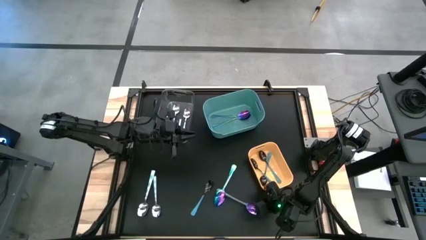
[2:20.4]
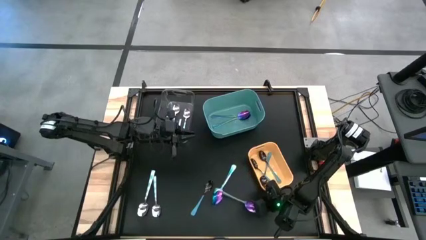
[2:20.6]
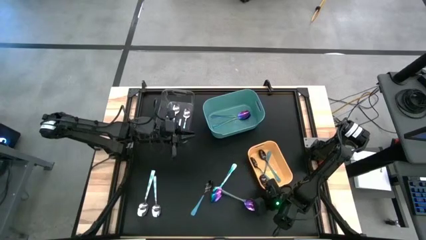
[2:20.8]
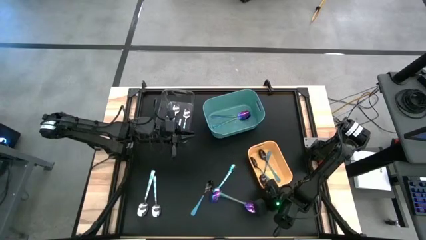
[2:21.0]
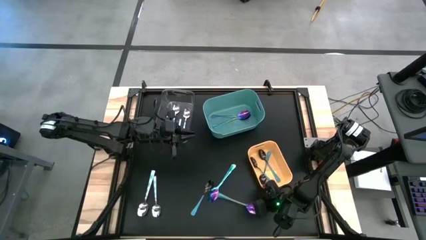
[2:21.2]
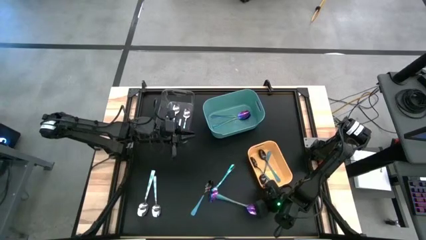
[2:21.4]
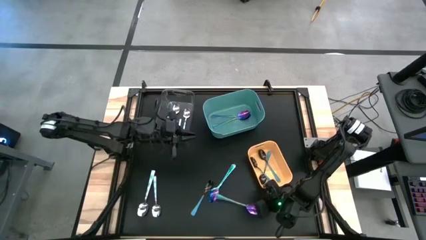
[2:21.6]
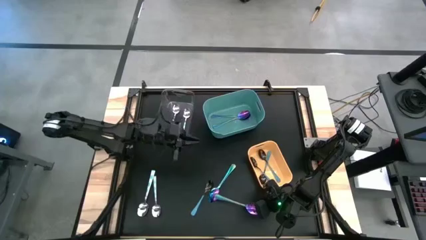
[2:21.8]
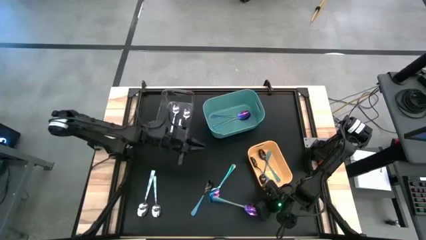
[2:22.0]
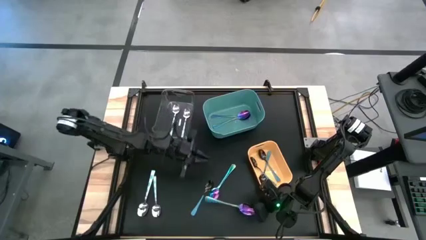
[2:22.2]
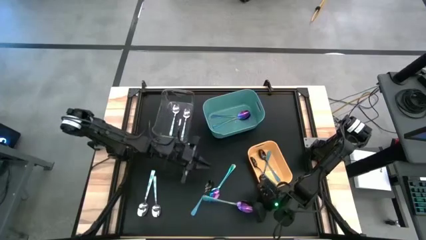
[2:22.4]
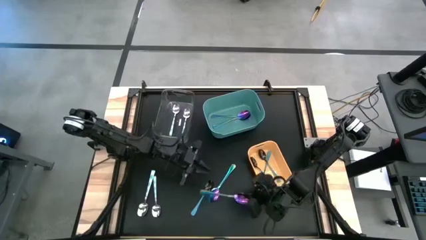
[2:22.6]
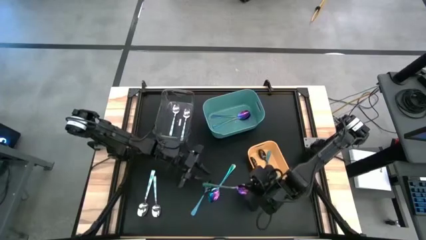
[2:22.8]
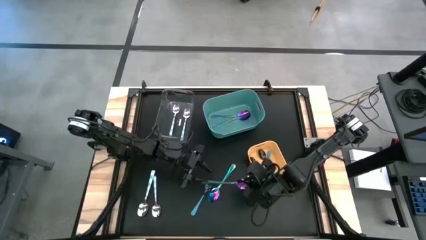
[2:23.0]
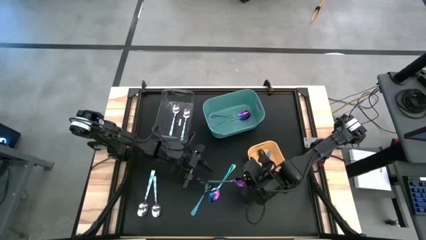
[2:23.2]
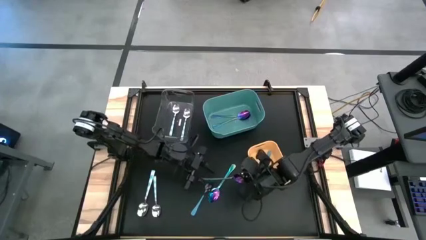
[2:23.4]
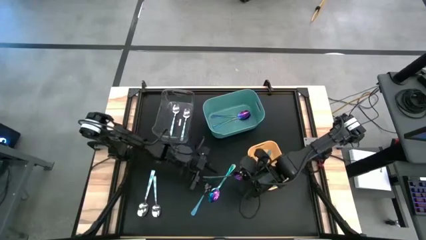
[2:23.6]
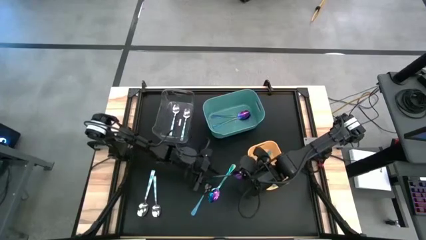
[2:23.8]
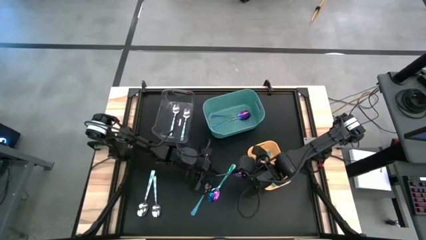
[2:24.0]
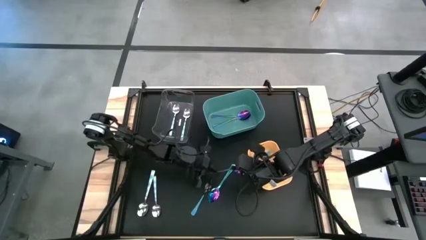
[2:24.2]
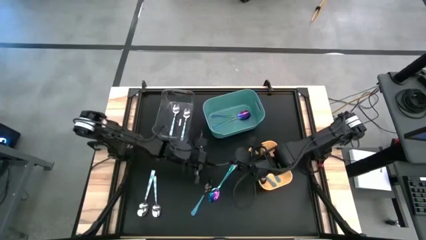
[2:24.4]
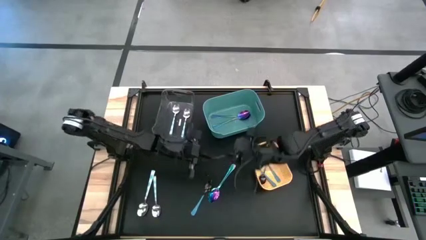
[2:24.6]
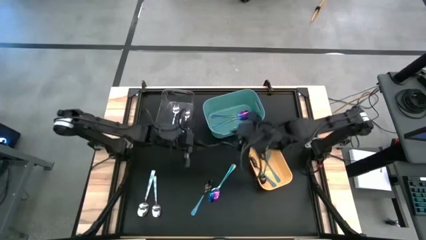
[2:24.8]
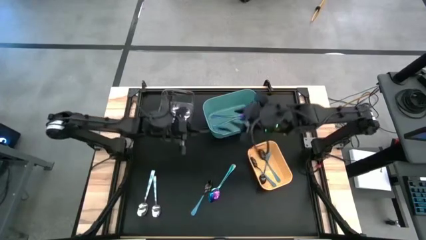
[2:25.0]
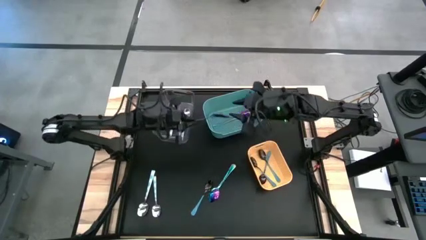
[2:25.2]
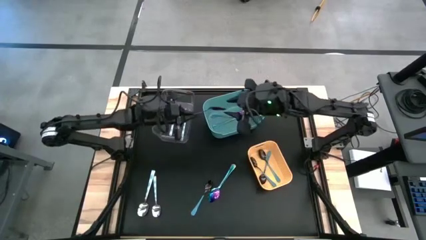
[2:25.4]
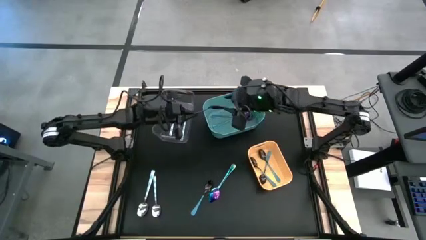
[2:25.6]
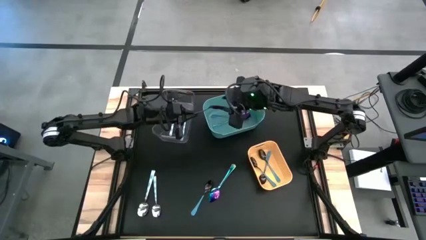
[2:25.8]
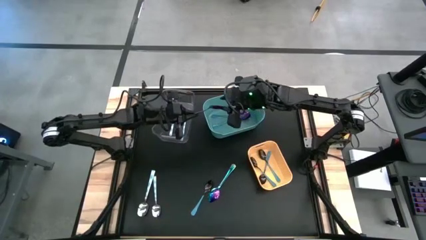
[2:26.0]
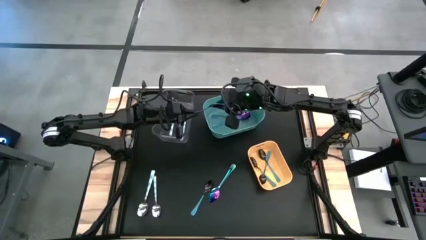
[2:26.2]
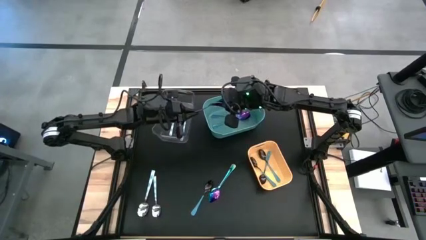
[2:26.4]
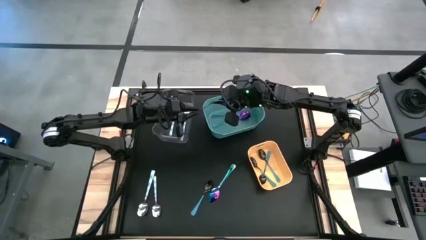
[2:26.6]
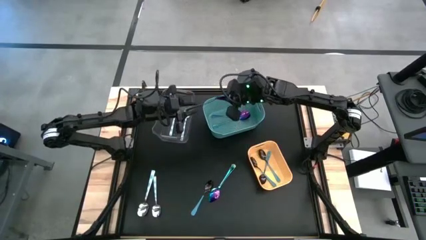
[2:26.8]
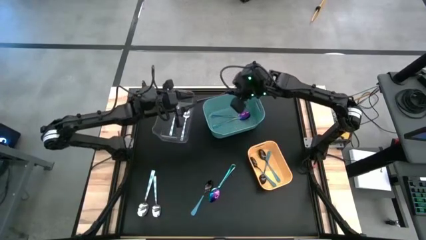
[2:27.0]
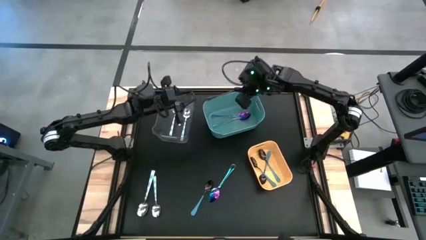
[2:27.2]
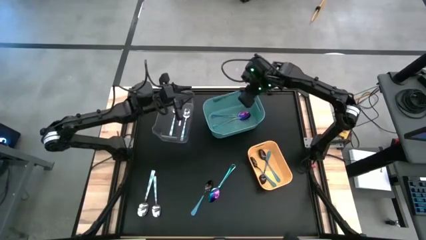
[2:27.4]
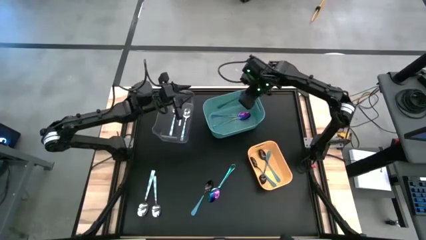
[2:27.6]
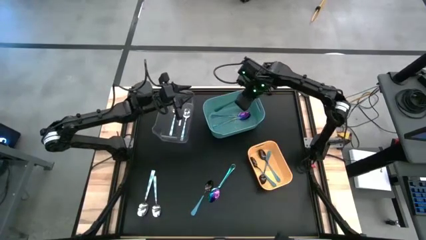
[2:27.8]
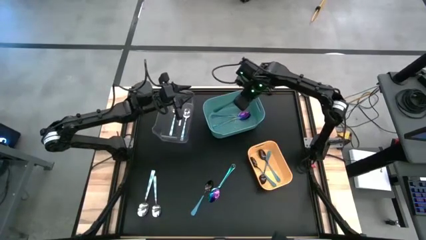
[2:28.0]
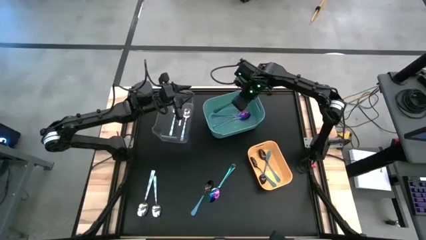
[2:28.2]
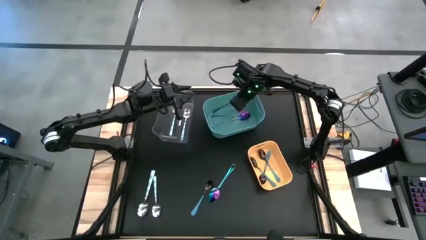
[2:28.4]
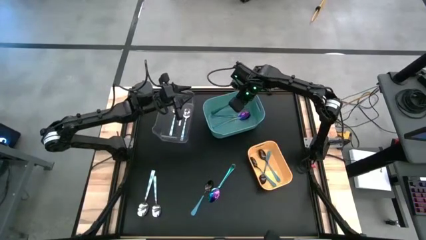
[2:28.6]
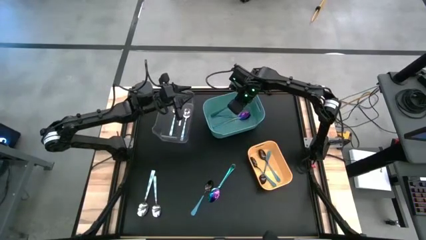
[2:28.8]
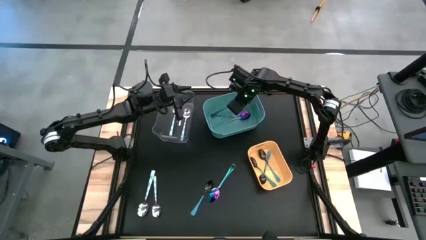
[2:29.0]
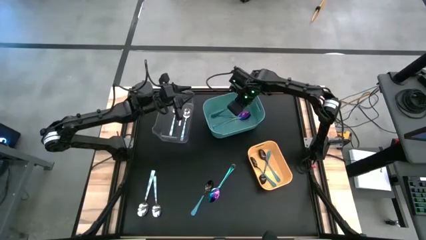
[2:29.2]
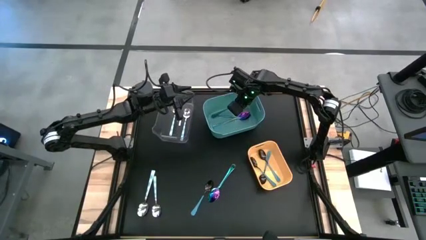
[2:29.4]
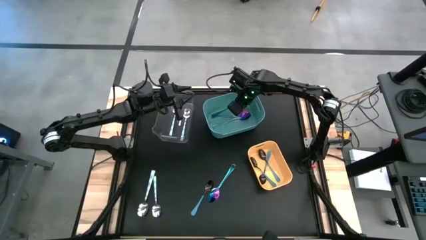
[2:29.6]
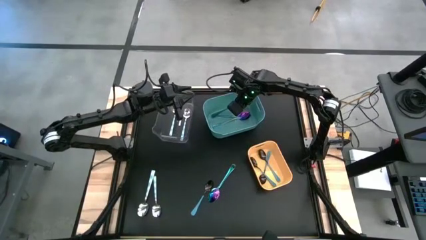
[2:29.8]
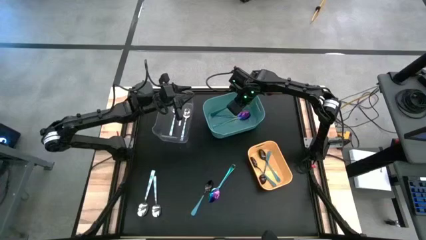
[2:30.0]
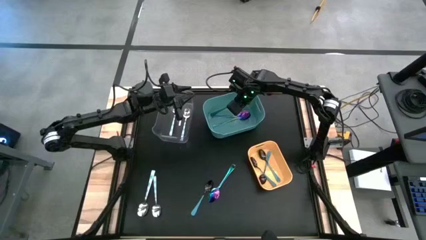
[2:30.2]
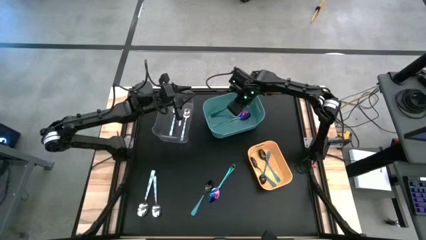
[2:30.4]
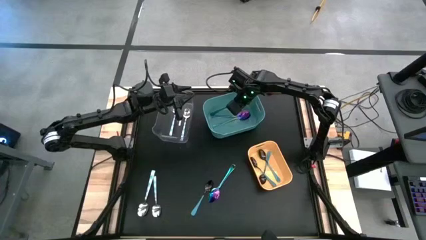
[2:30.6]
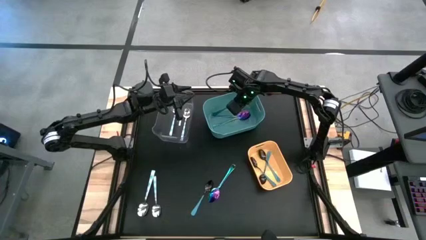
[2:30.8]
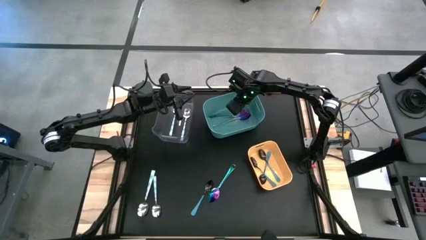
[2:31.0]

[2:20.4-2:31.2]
Task: Sort silverware by color (type)
Put the purple spoon into the green bin

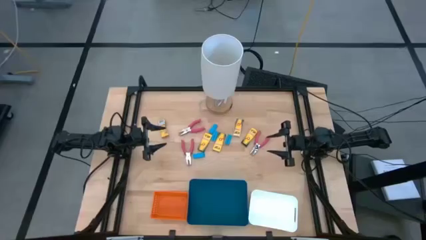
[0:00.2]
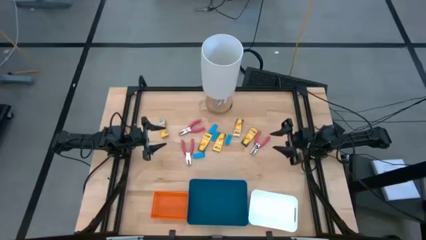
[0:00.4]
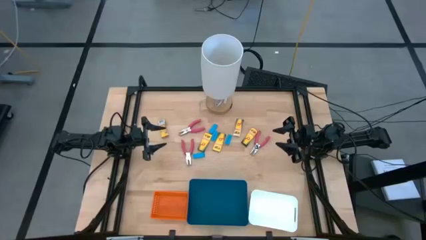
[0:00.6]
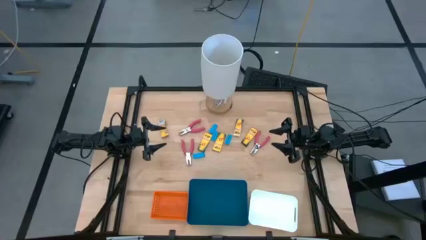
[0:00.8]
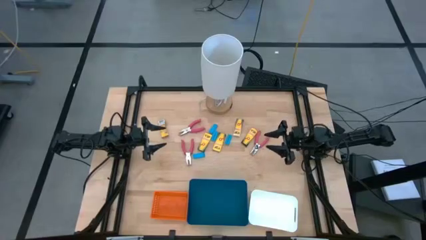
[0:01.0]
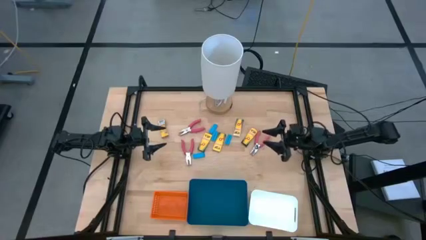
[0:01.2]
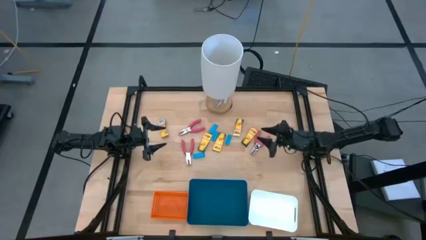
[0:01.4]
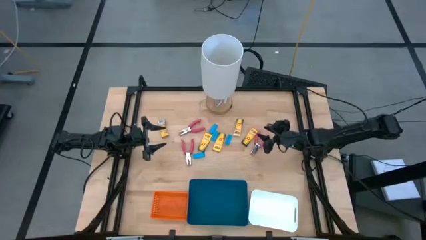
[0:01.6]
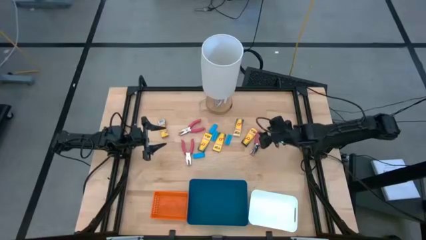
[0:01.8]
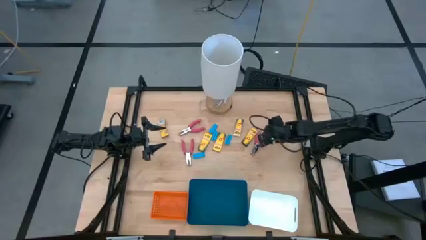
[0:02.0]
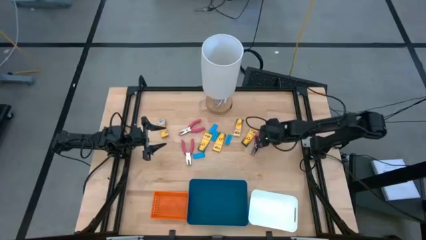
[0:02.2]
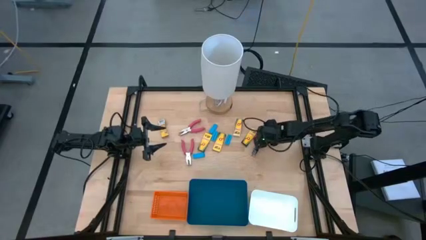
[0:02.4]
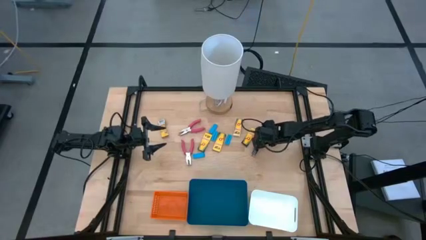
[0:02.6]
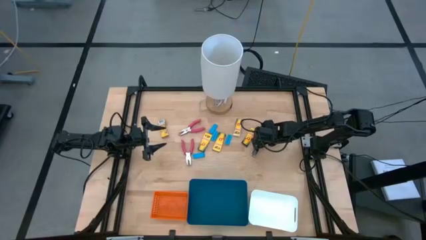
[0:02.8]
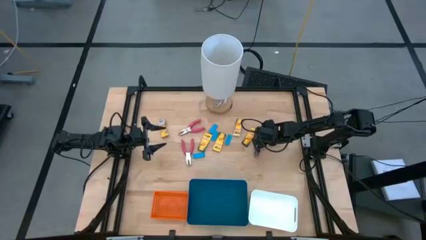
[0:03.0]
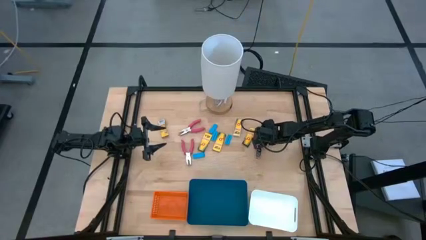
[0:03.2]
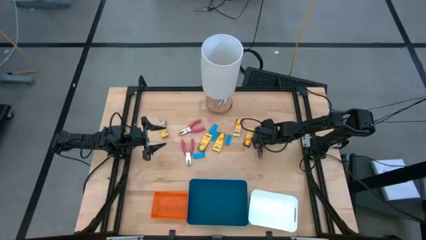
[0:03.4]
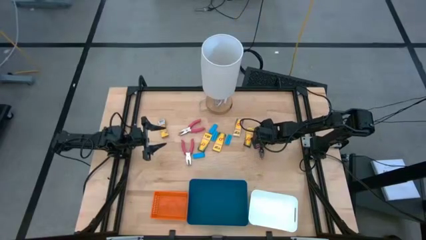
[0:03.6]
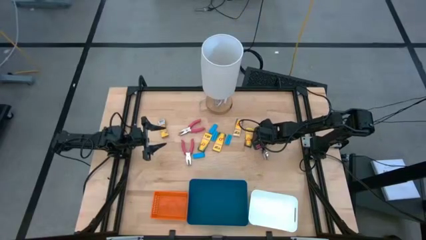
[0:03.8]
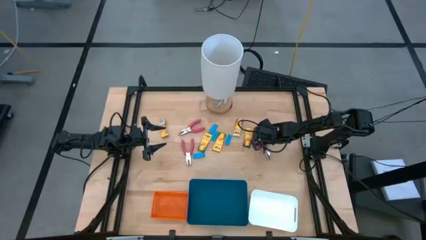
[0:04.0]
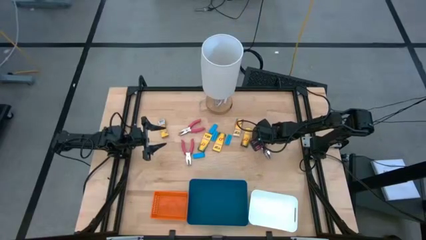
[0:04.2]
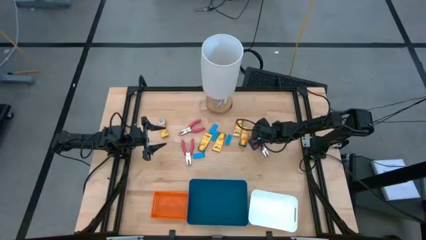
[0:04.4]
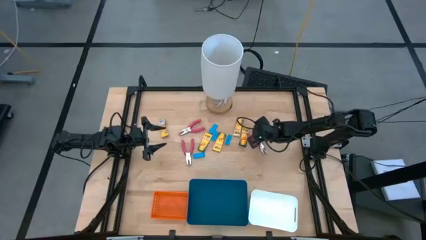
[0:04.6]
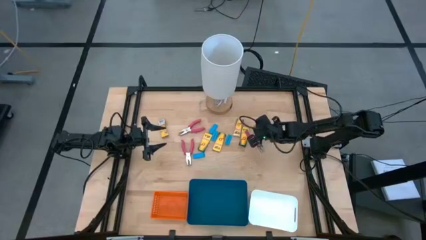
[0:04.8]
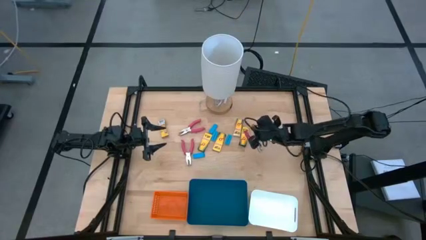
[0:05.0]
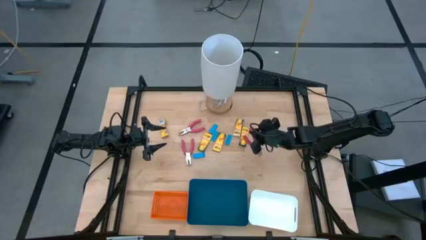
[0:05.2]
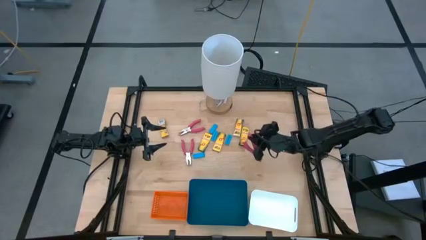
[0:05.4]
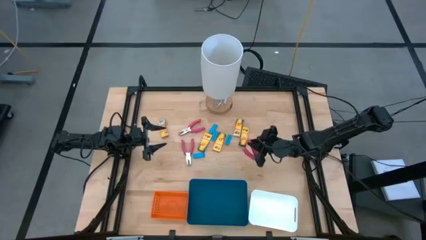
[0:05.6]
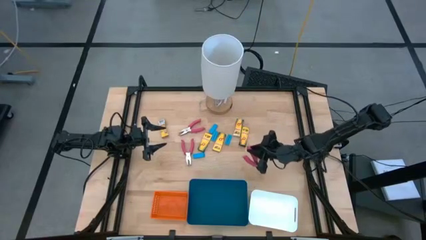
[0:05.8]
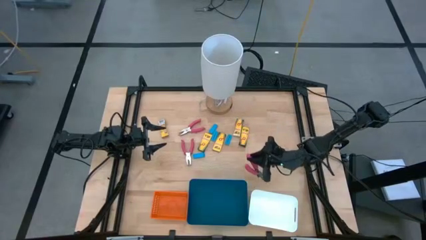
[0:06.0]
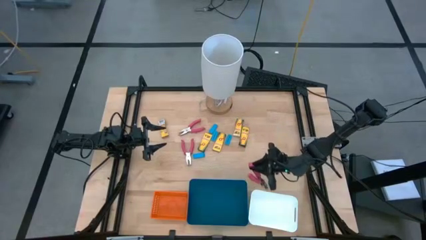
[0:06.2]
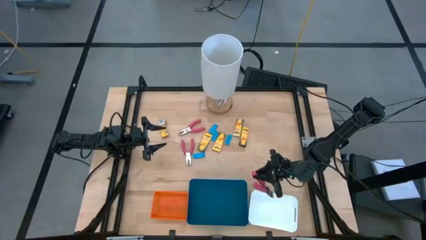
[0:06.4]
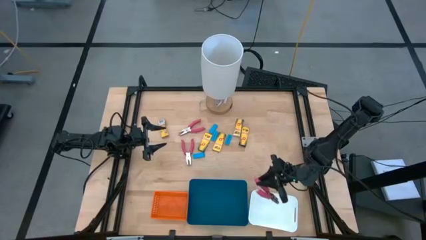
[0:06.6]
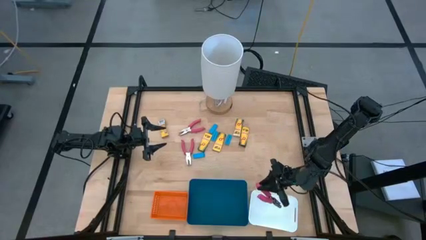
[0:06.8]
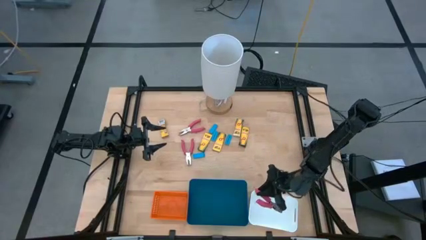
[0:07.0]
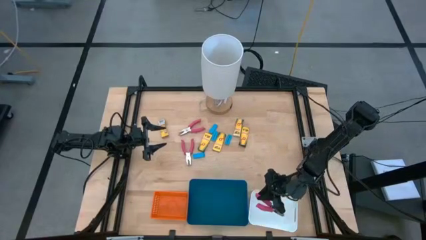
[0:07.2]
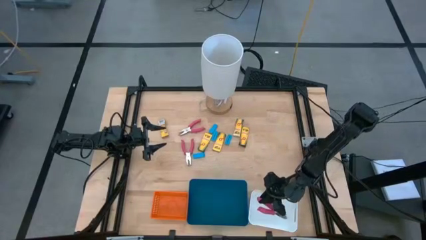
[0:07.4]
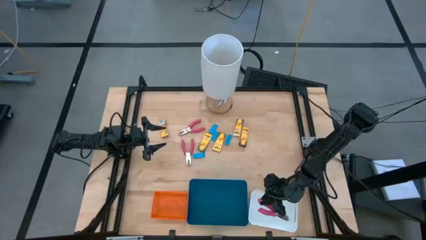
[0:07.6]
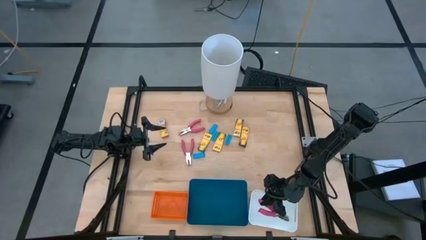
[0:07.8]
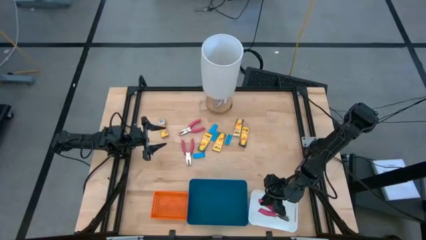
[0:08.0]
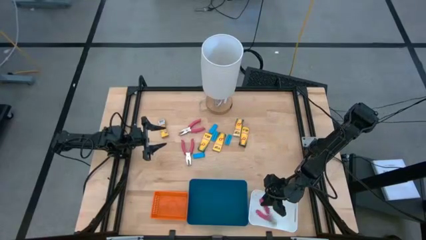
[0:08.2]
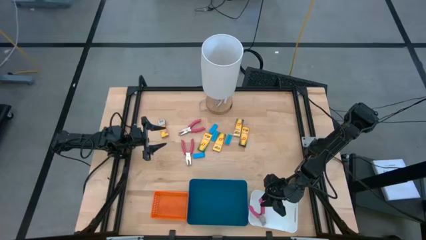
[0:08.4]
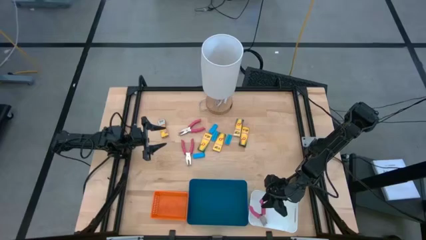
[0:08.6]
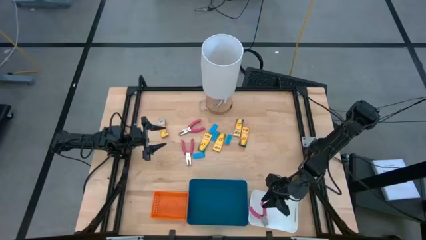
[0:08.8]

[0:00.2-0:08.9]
Task: Pick & Place School Supplies
Put the pink hole puncher into the white bin
